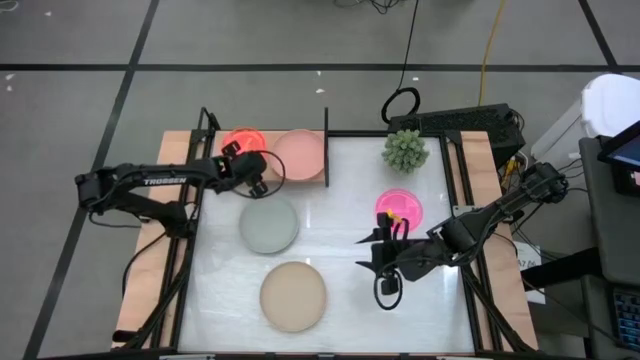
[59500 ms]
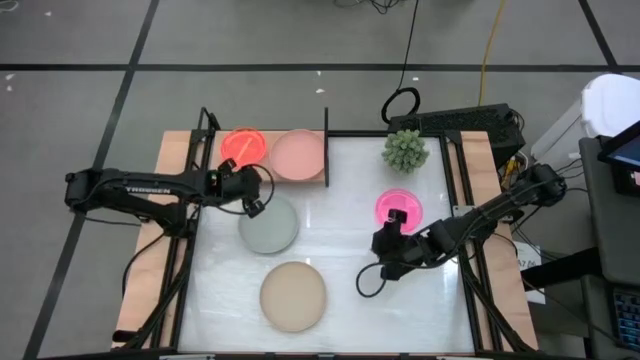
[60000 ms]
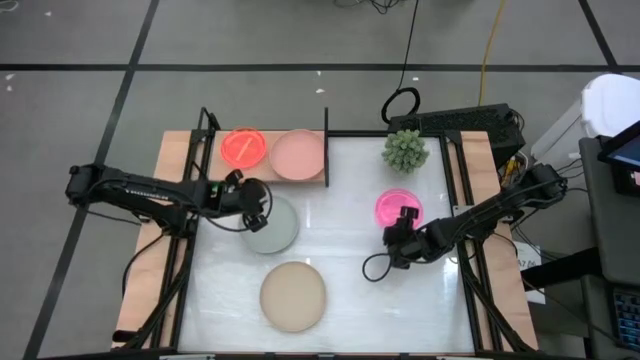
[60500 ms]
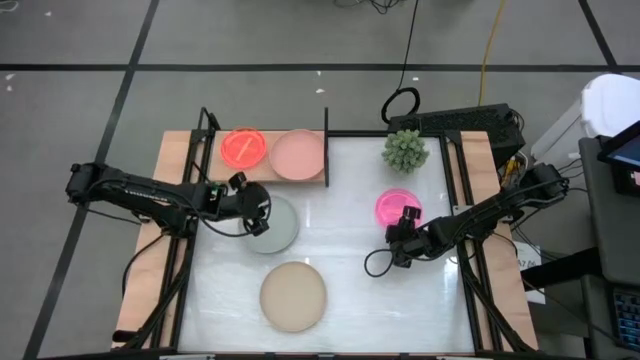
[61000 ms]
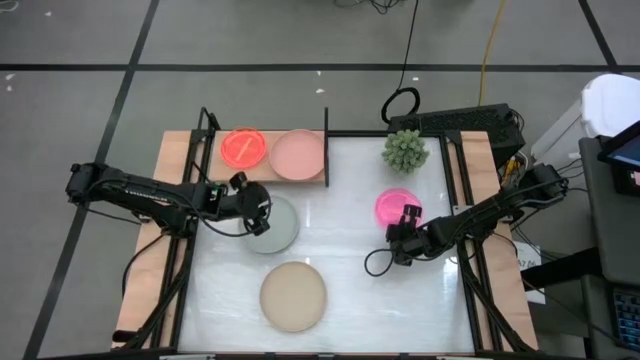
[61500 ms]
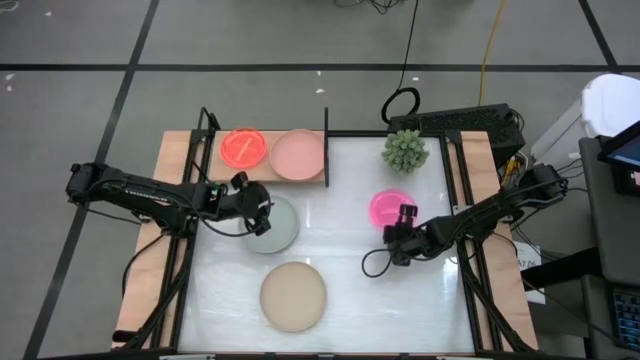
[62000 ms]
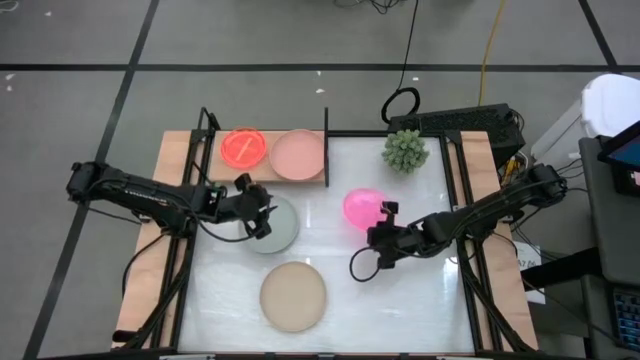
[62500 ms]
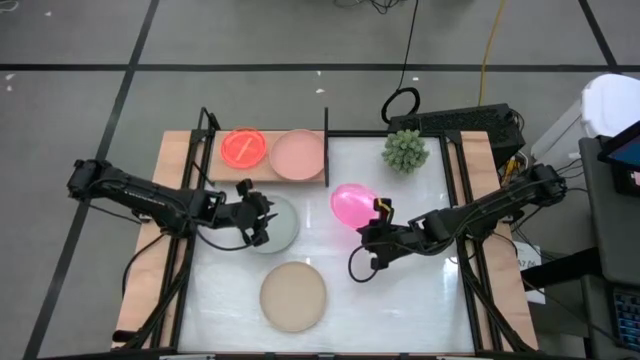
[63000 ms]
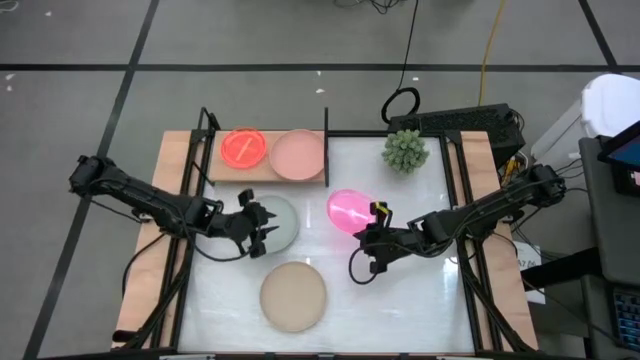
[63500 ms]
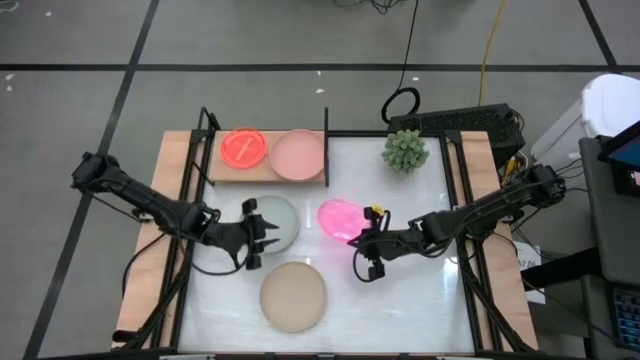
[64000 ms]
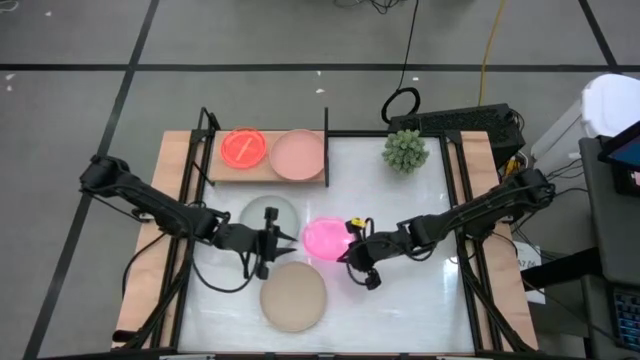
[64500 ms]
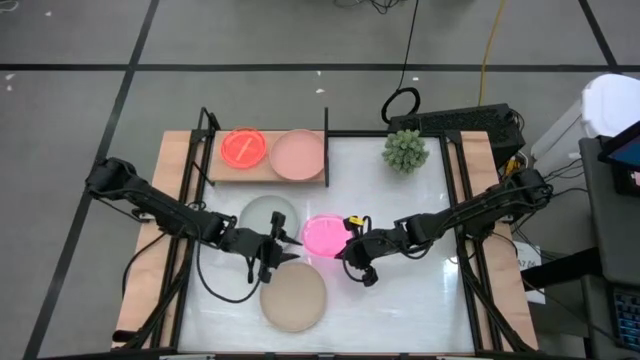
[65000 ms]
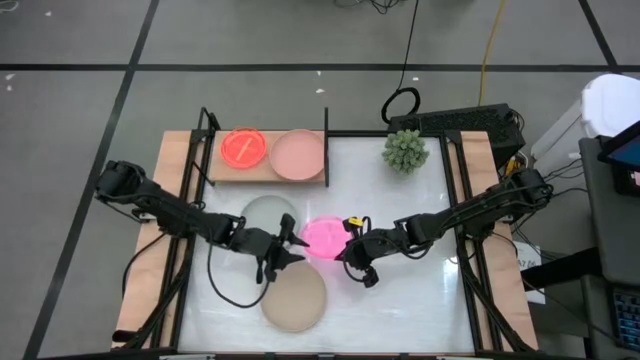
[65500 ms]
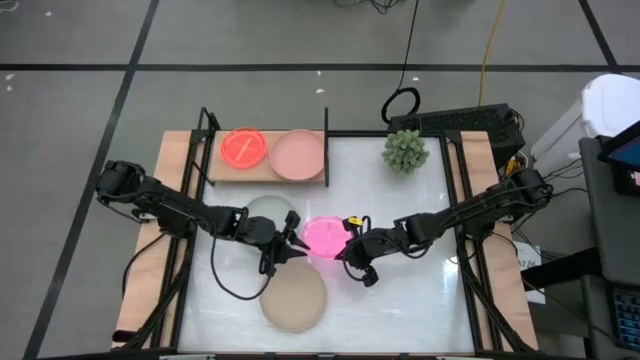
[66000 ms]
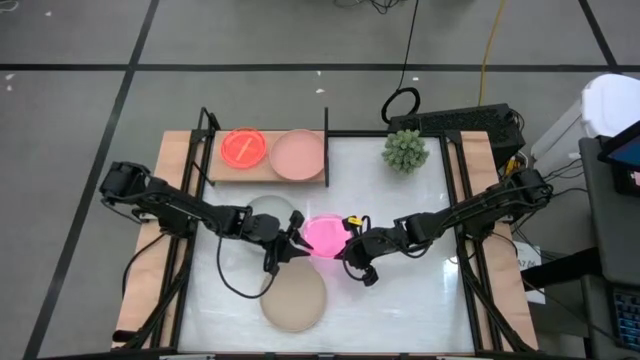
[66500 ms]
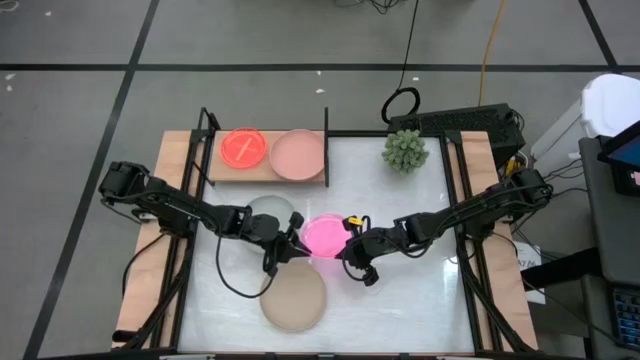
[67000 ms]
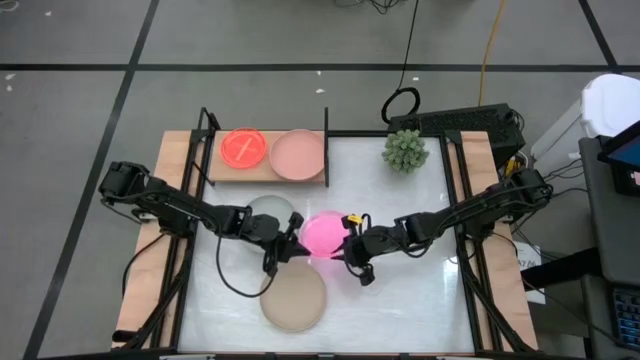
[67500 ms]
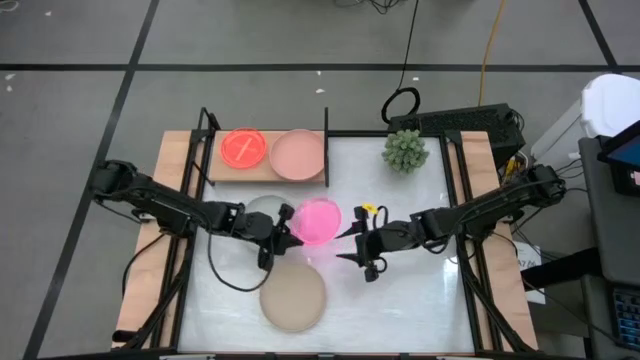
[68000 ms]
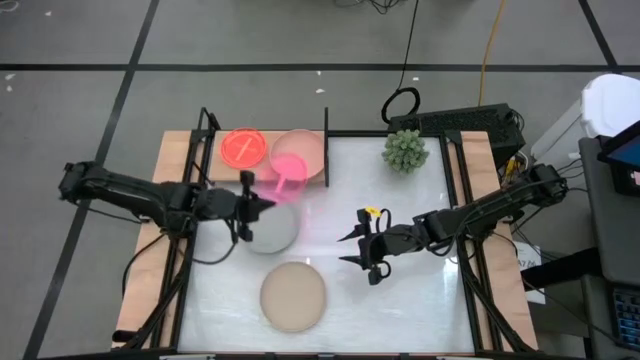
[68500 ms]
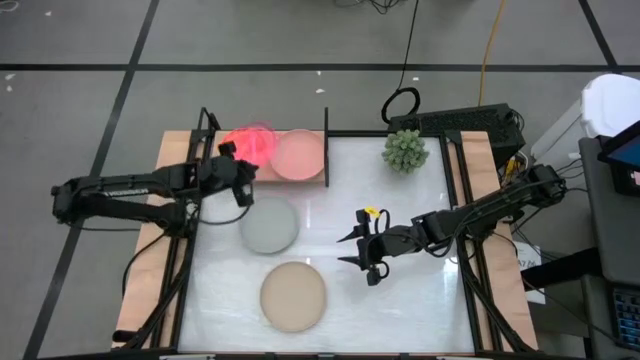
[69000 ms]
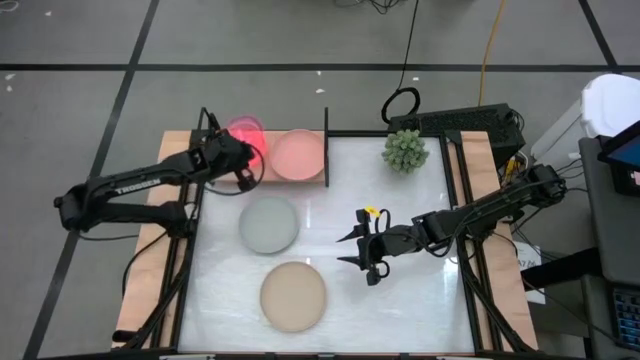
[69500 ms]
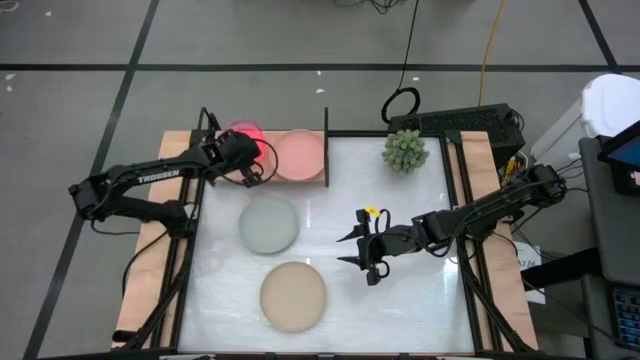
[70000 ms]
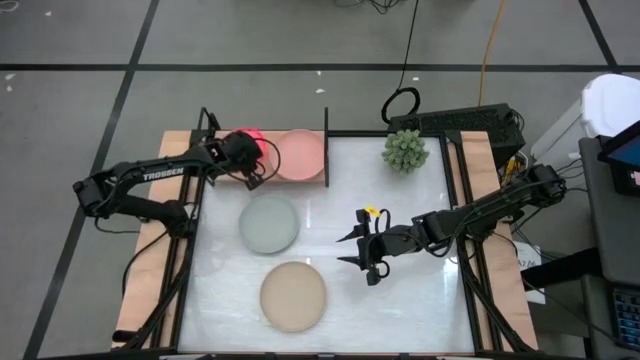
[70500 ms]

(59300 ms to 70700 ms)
Task: Place and stack plates onto a shelf
Stack the pink plate on top of the orange plate on the shelf

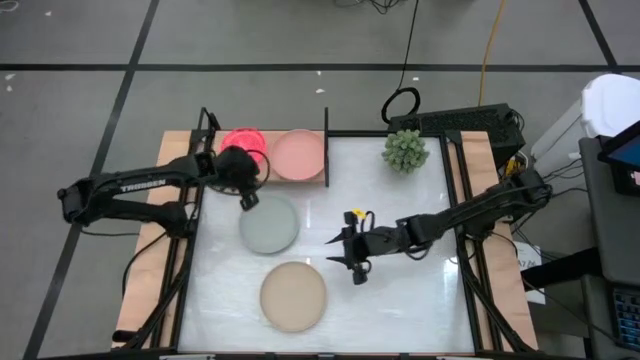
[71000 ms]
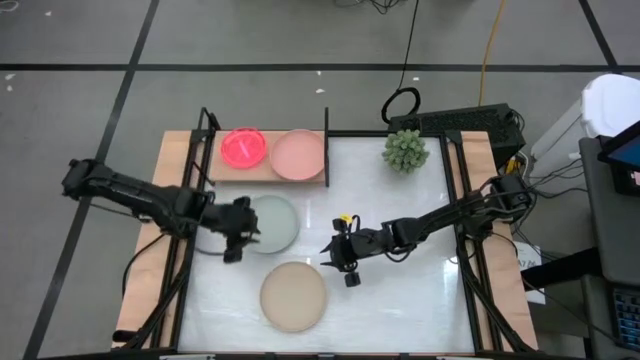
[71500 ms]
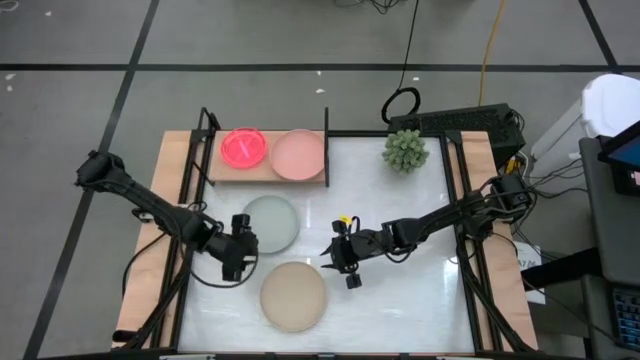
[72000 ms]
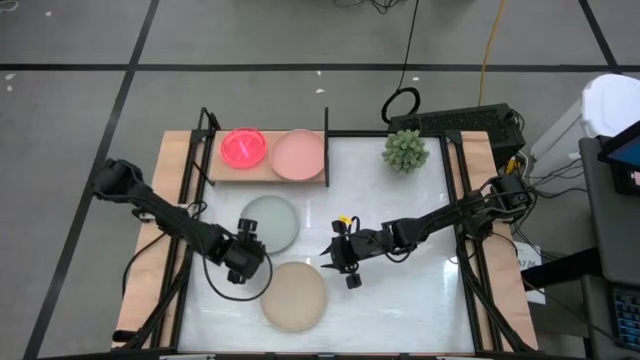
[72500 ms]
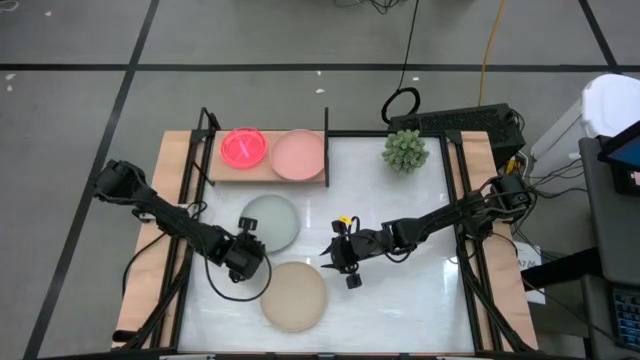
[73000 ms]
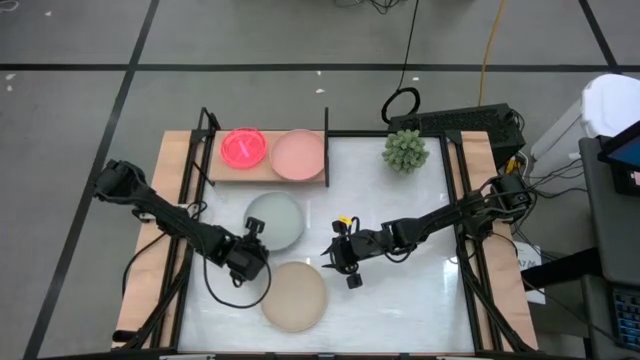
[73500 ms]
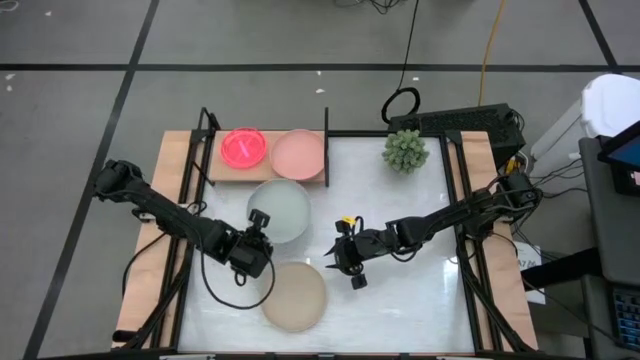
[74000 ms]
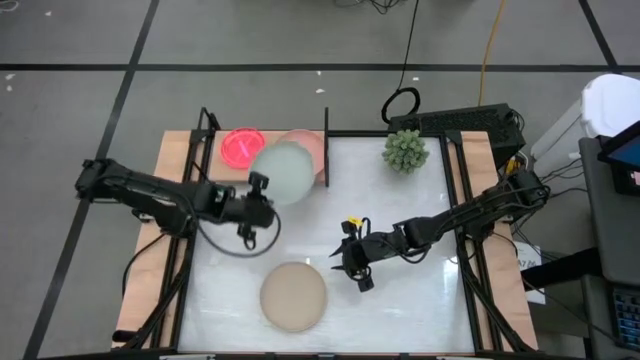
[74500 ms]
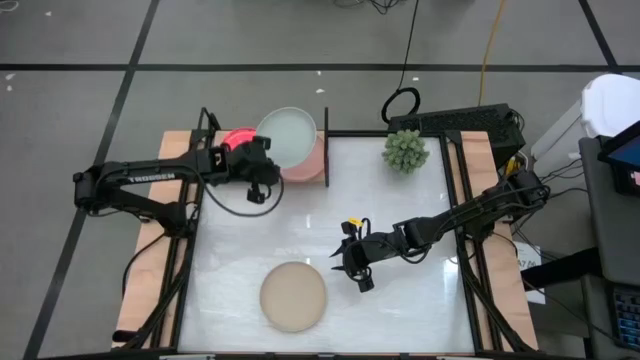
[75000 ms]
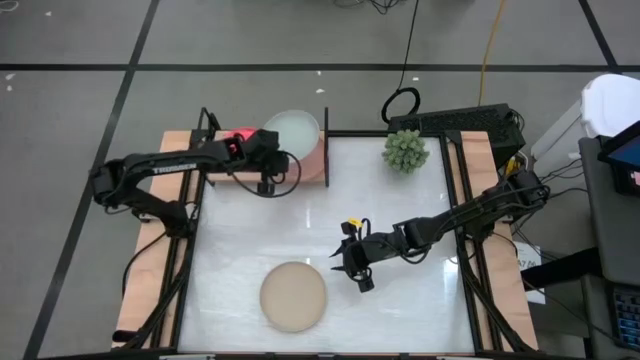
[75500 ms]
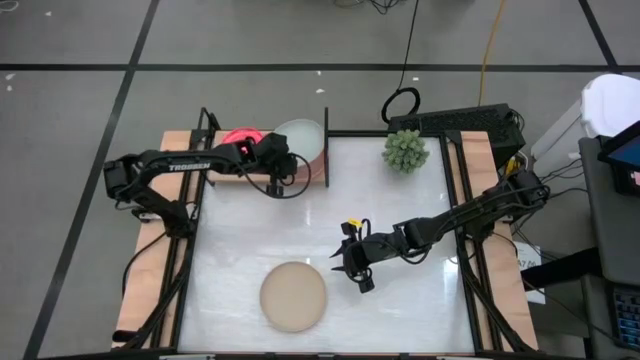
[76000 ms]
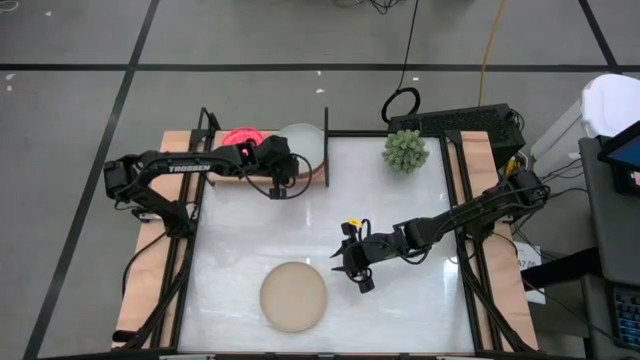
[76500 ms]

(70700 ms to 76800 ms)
Stack the gray plate on top of the brown plate on the shelf

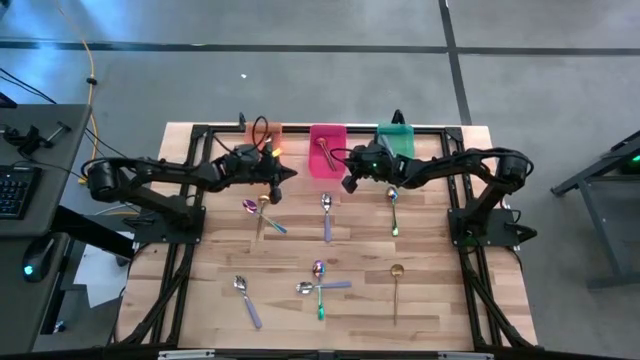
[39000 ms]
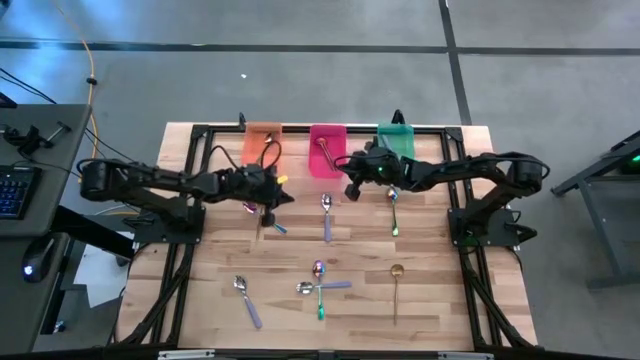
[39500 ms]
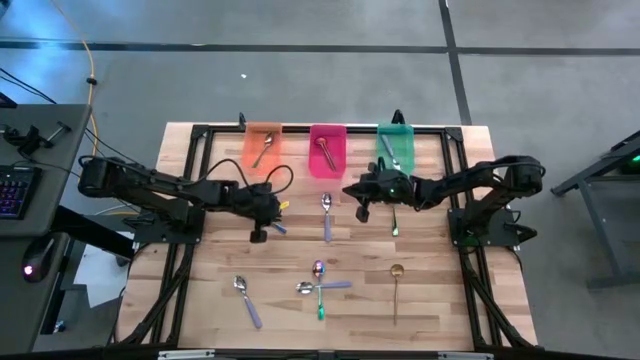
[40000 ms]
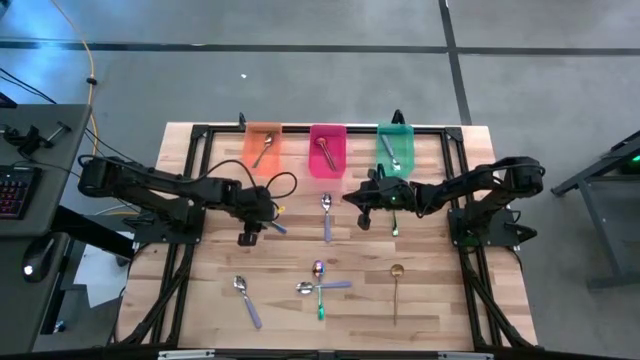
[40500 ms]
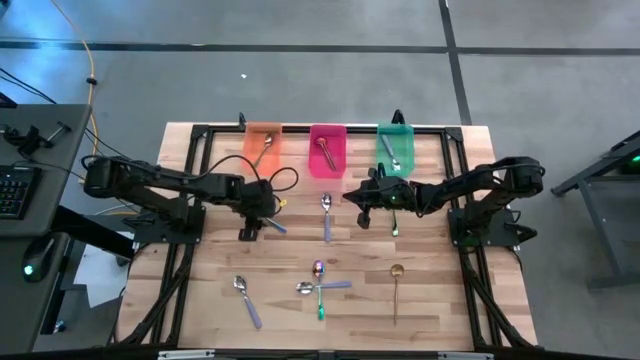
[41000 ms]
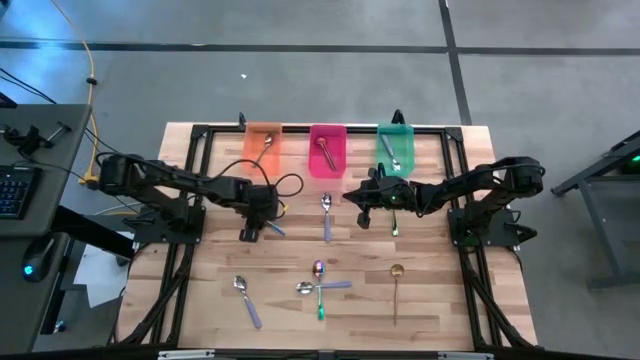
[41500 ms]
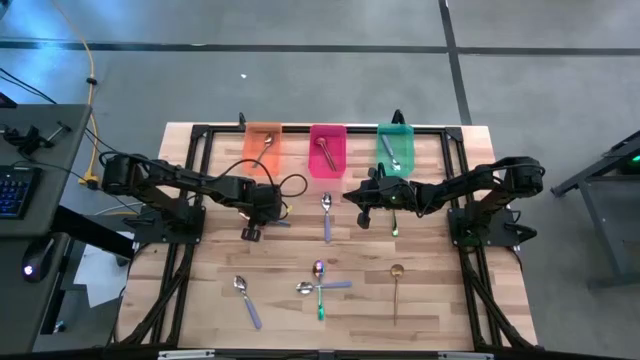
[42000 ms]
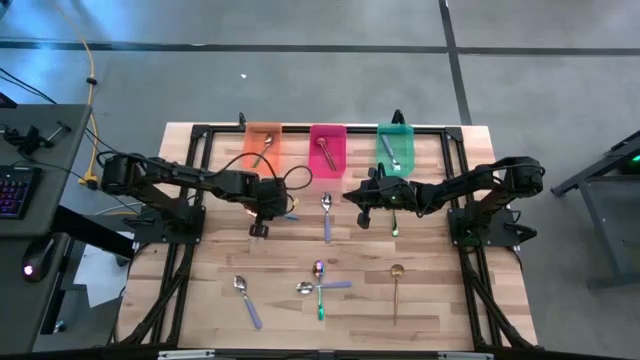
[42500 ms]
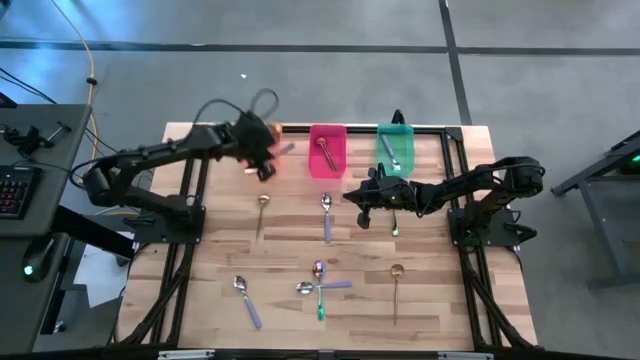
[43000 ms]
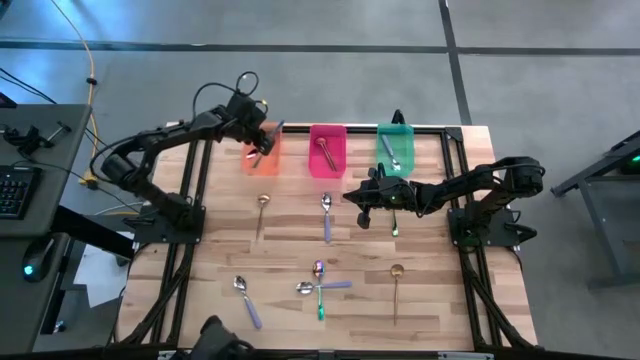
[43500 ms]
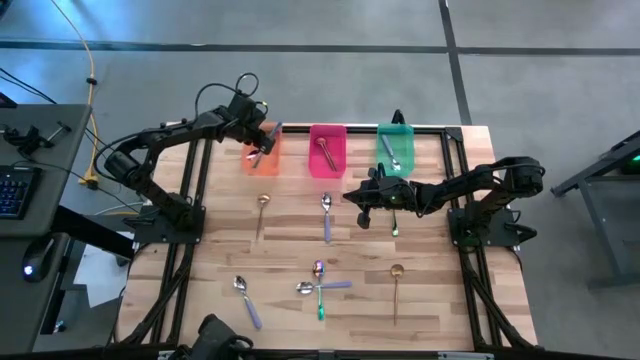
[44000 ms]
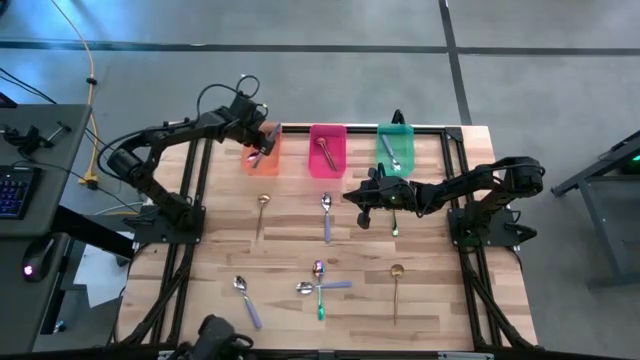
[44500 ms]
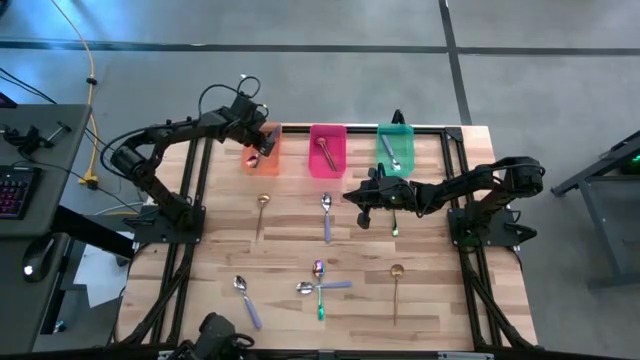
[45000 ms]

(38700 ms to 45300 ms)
Task: Sort silverware by color (type)
Put the top left iridescent spoon into the orange bin
